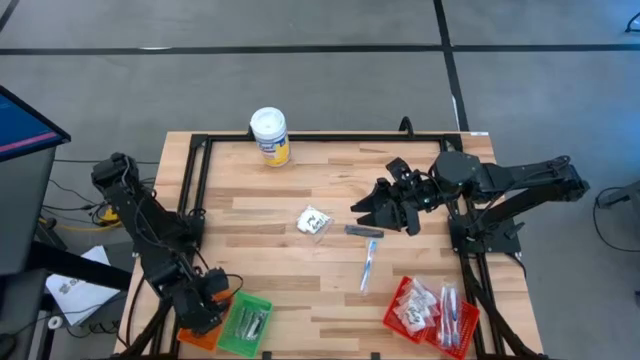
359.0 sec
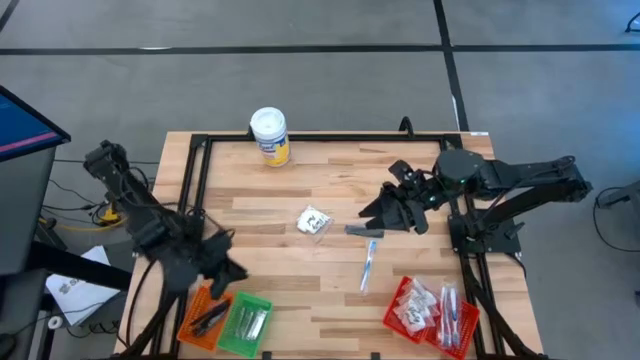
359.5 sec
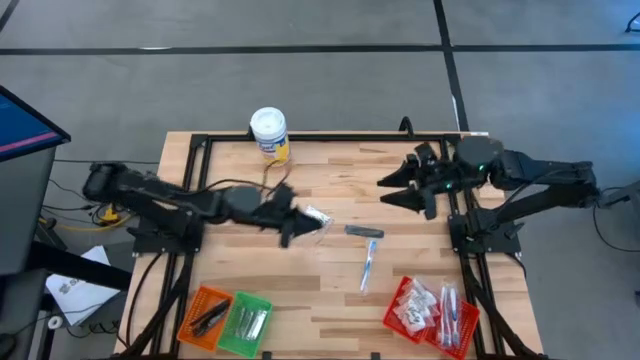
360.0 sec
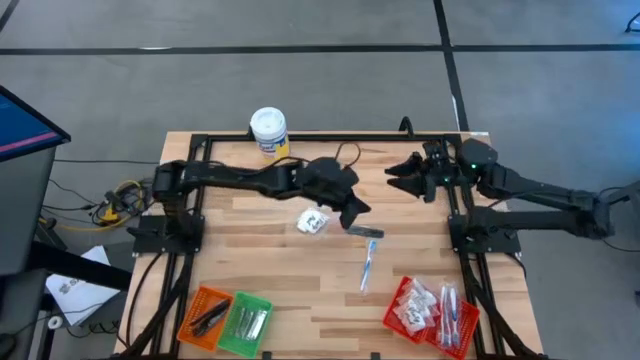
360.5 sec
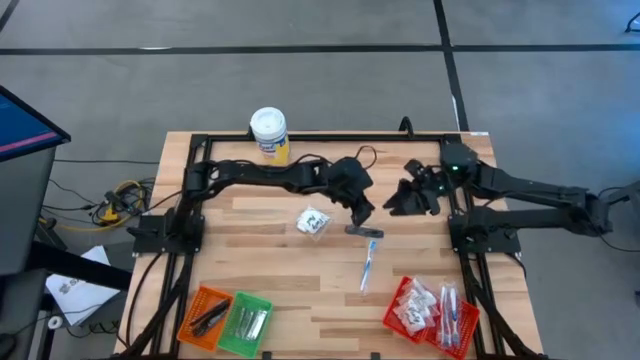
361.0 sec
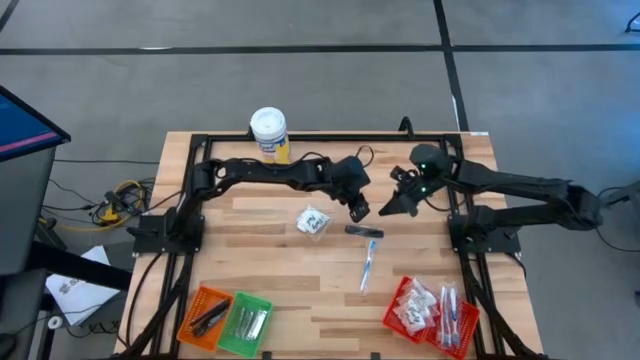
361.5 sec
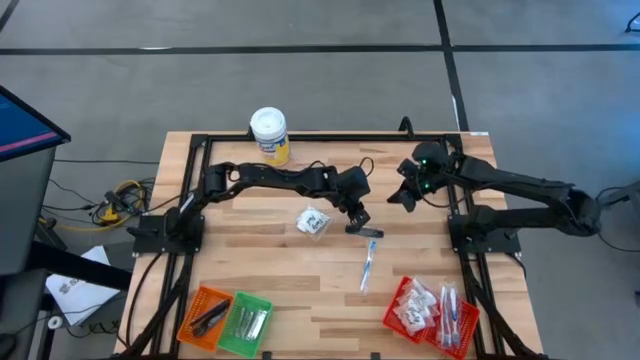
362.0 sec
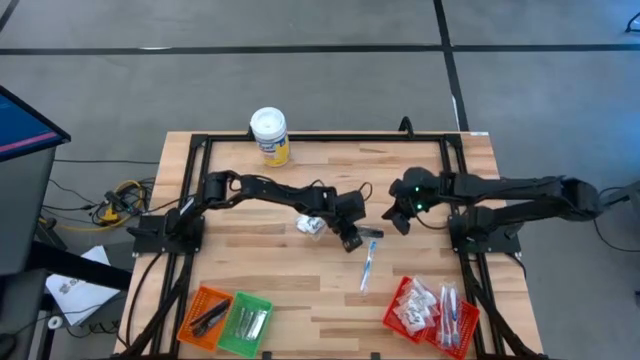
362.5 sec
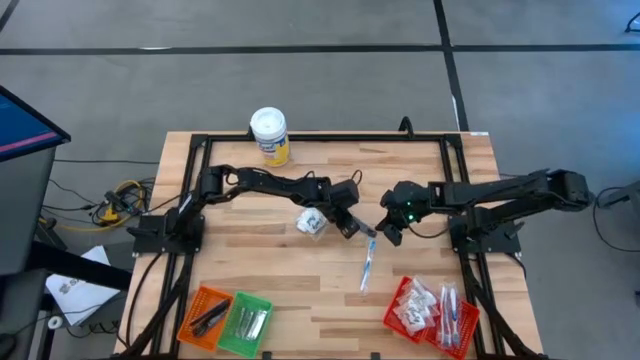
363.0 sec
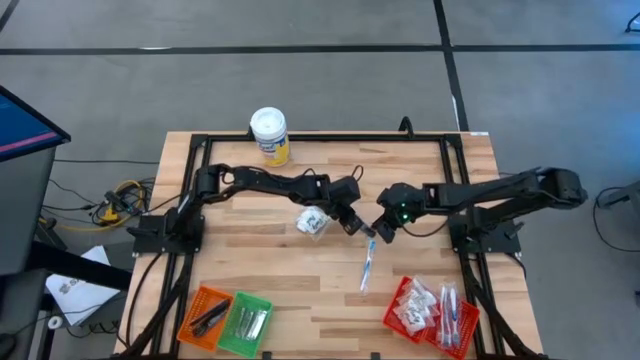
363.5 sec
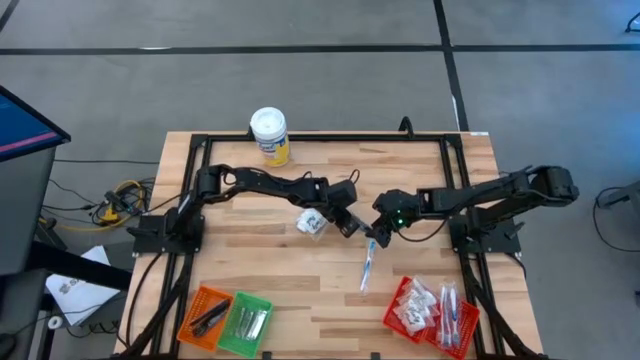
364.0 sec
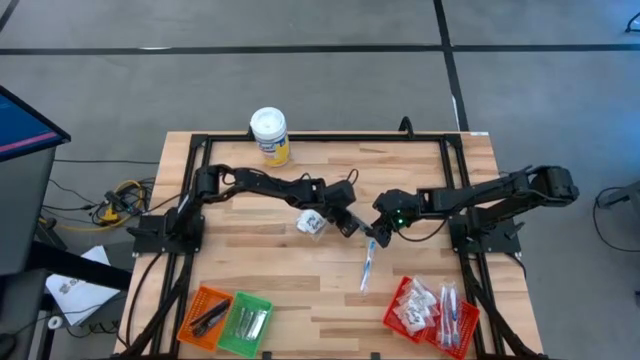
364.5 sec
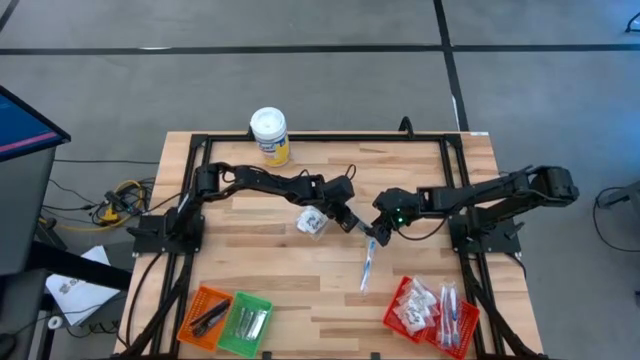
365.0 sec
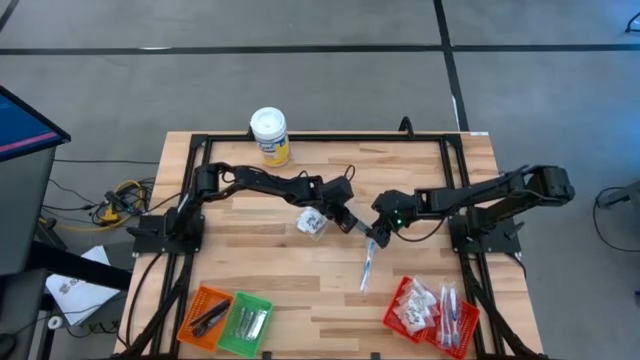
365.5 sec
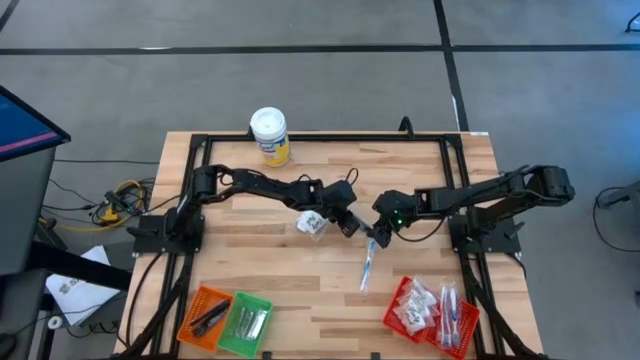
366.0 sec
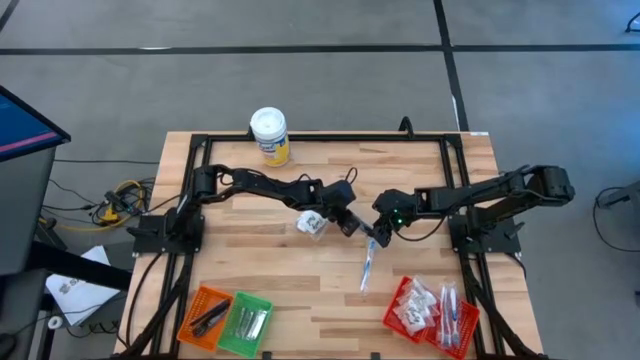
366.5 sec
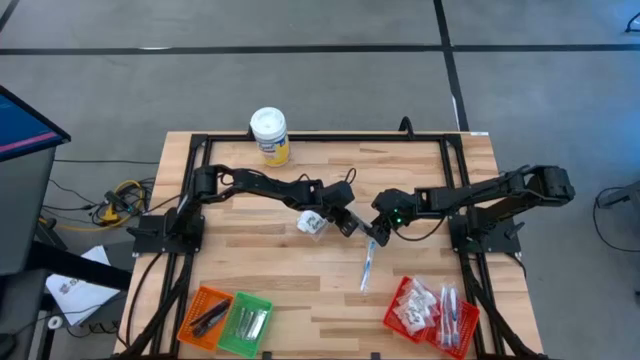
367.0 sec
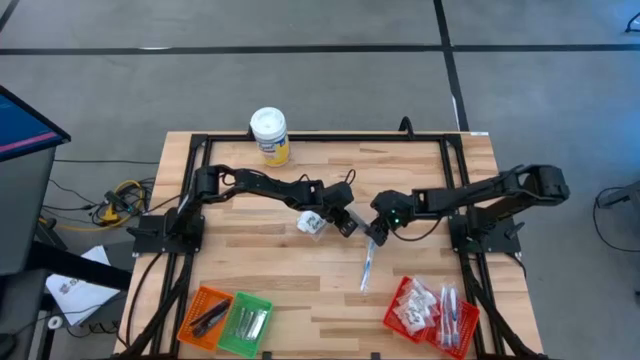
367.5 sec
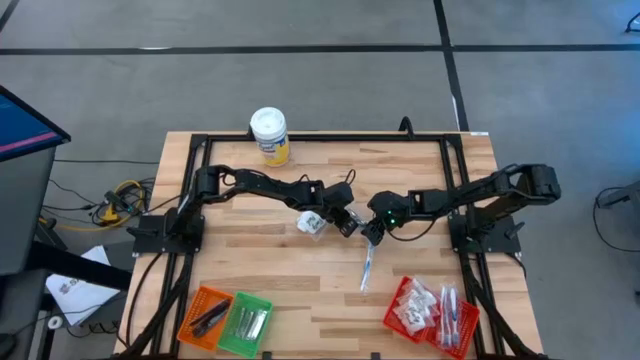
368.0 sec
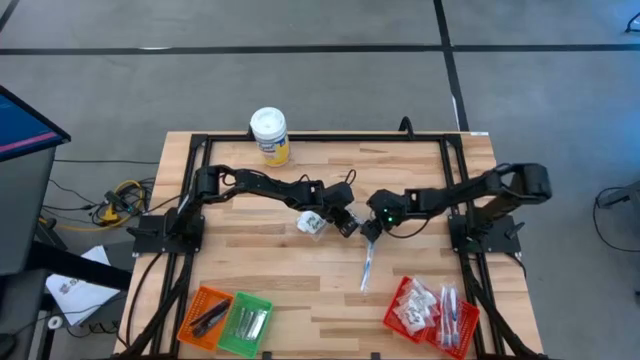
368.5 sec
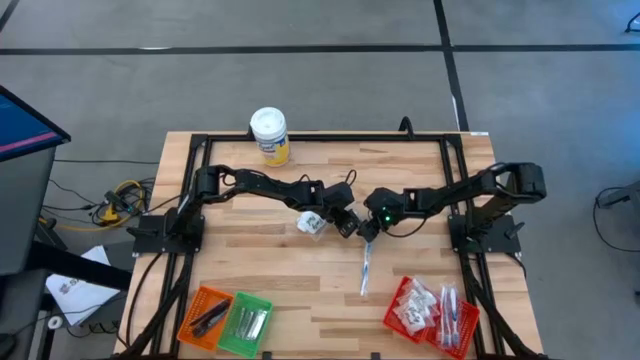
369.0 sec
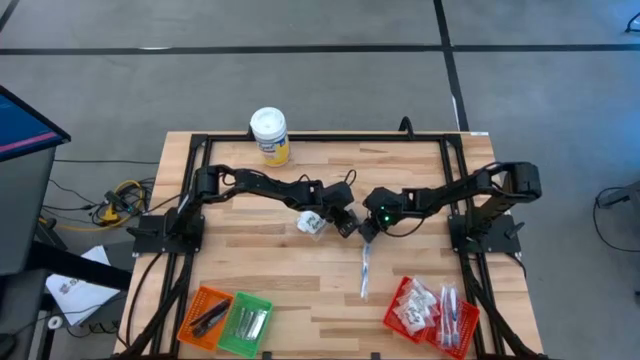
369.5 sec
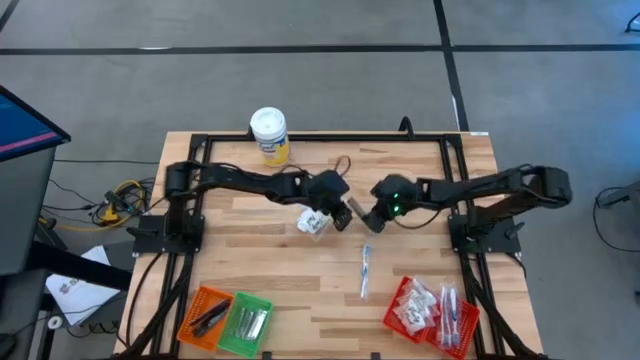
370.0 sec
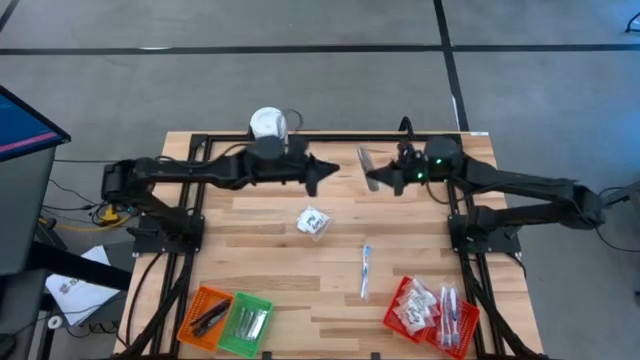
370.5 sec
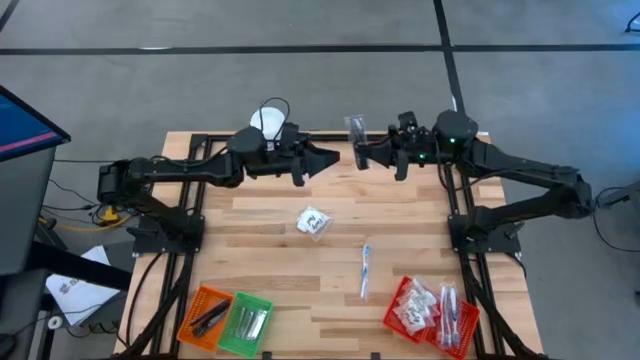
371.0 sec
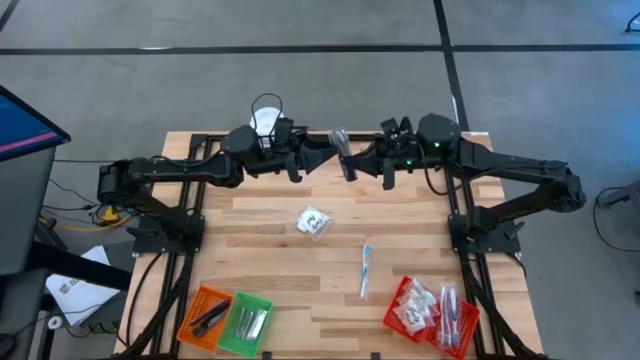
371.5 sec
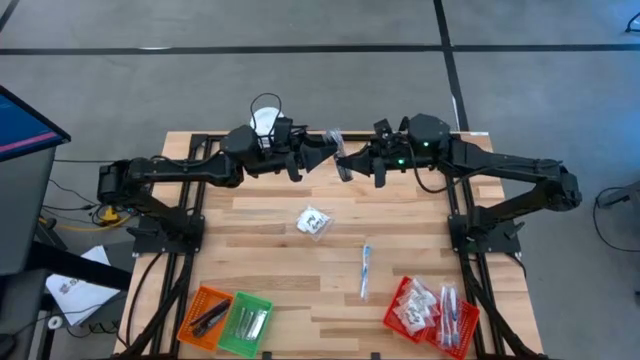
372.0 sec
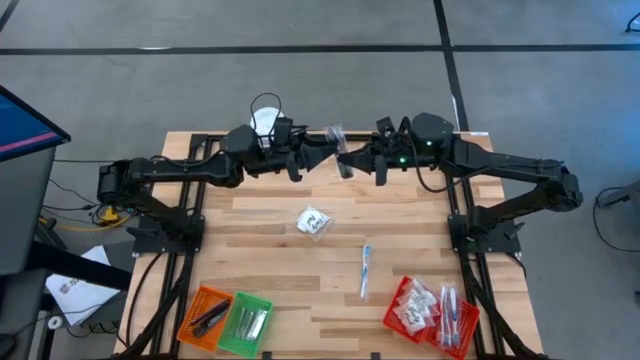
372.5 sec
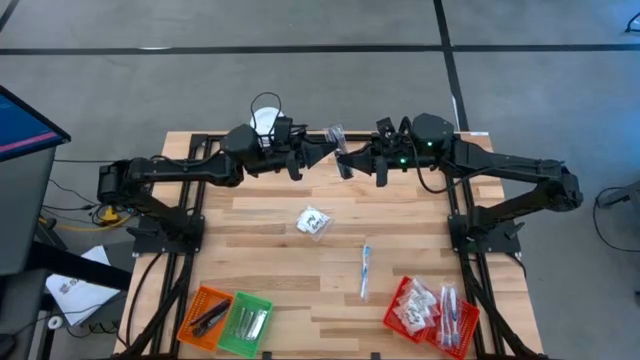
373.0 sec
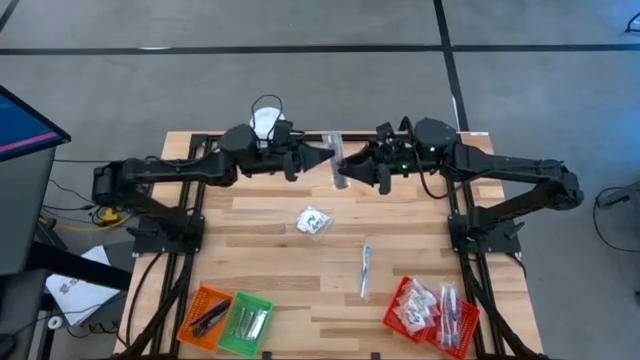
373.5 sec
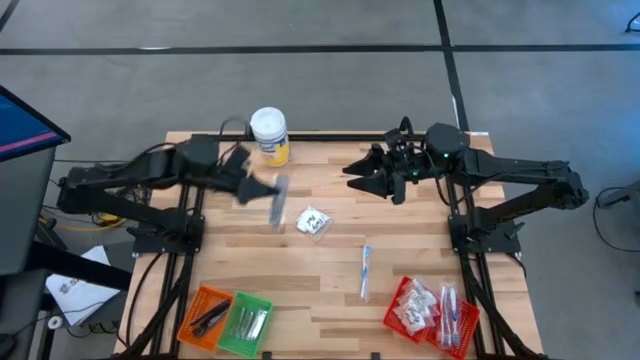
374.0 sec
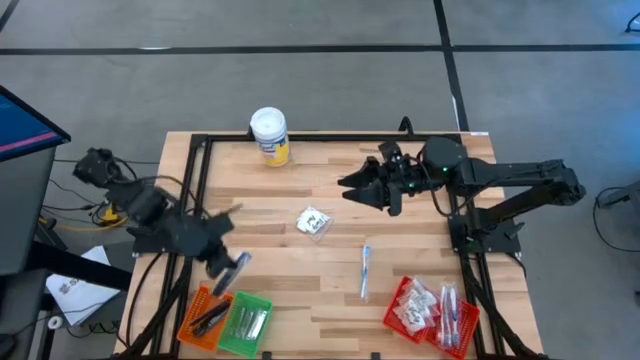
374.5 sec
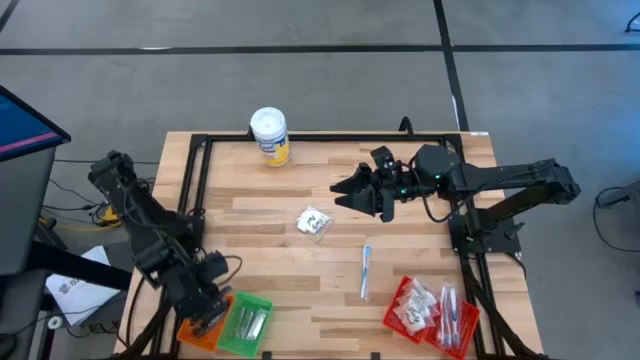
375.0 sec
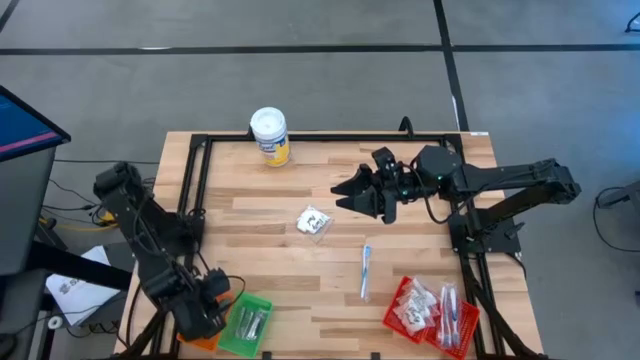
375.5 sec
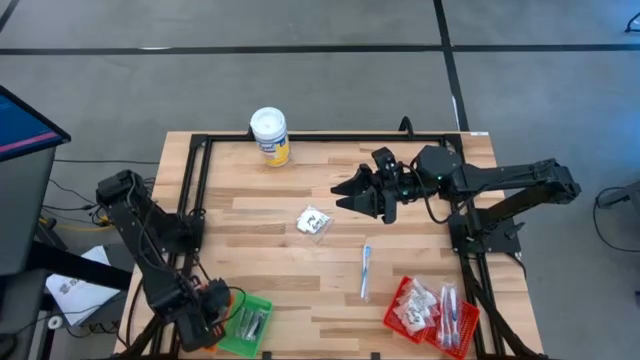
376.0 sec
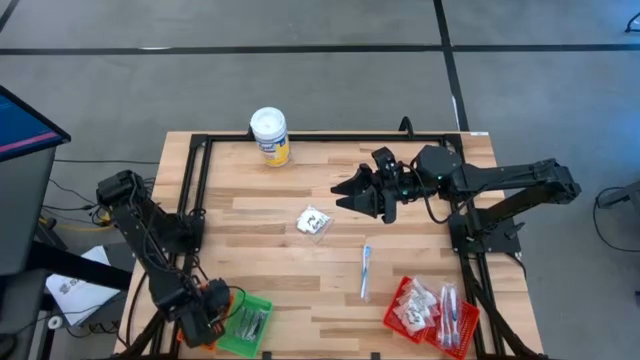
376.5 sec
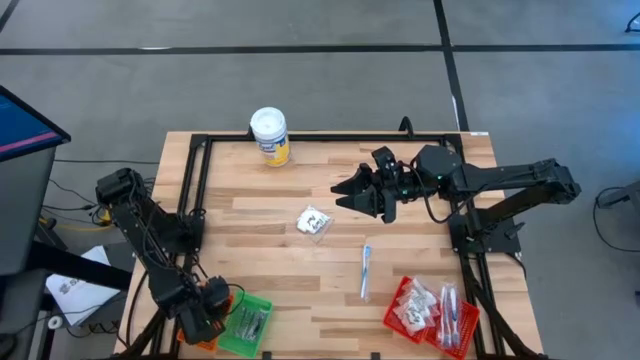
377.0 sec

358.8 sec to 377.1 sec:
Task: Pick & Place Travel size toiletries
Put the black comb into the orange basket
